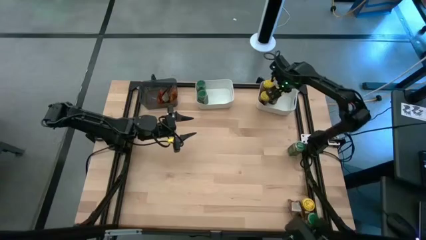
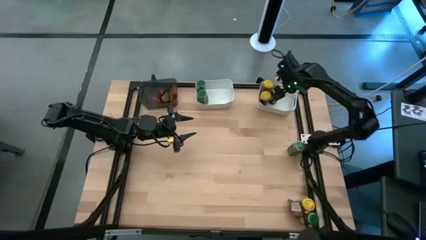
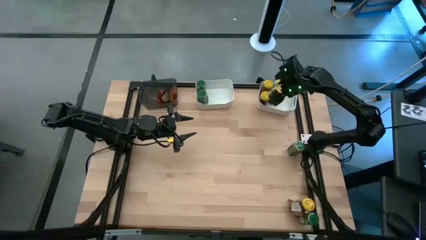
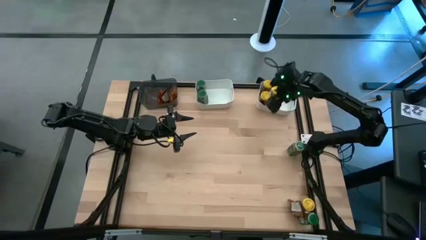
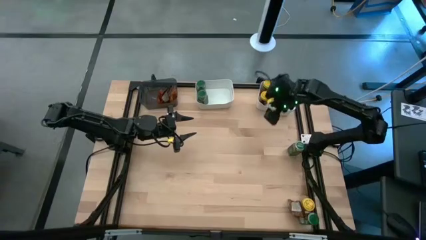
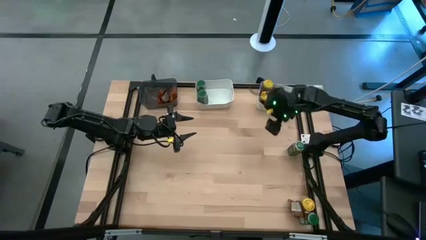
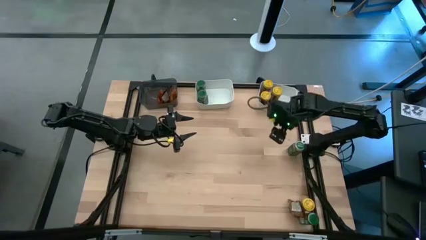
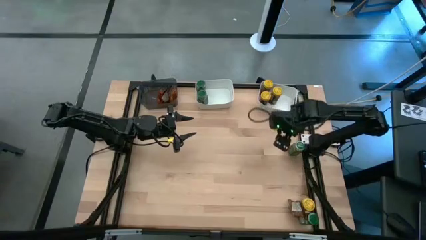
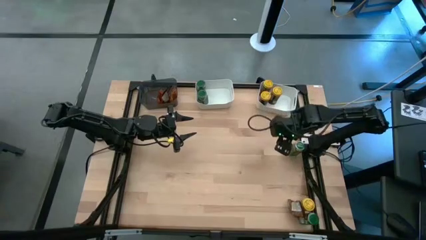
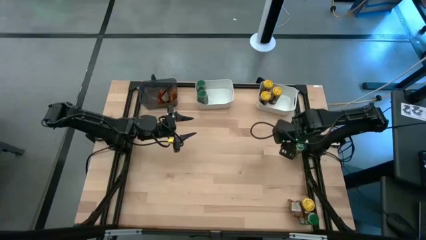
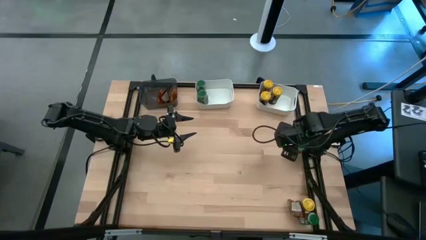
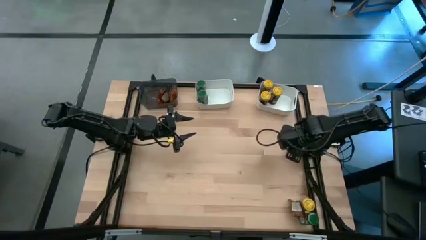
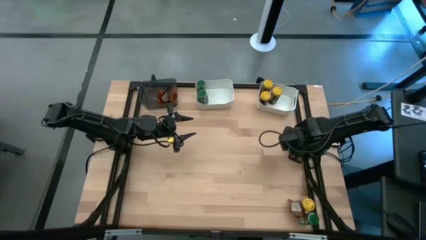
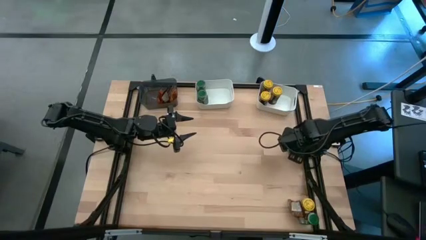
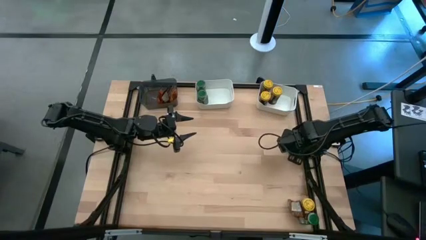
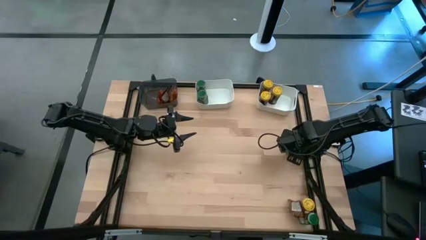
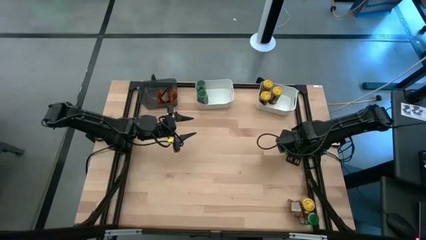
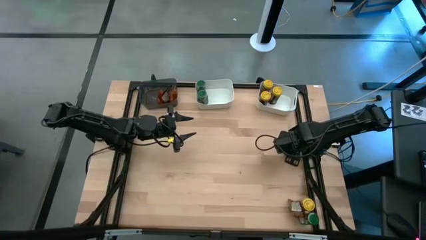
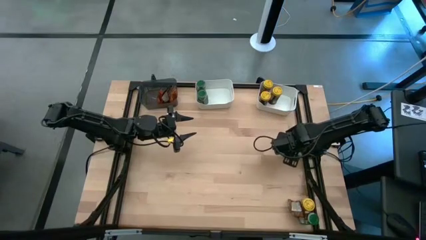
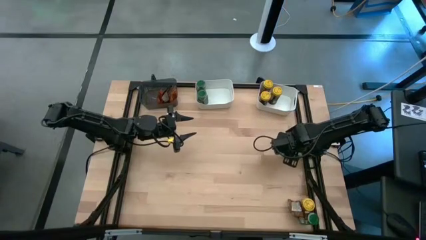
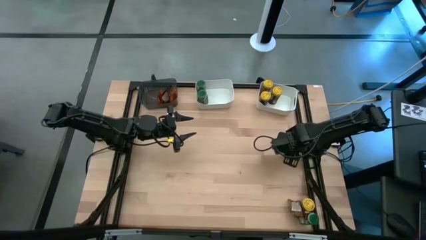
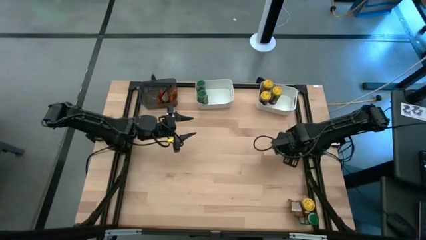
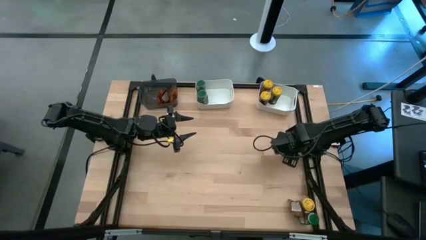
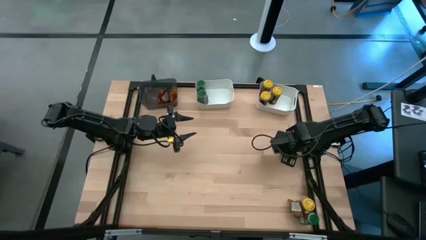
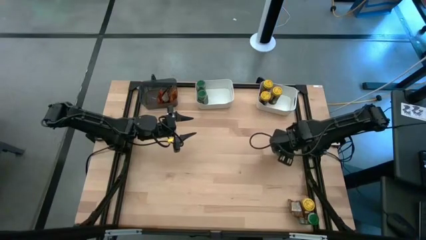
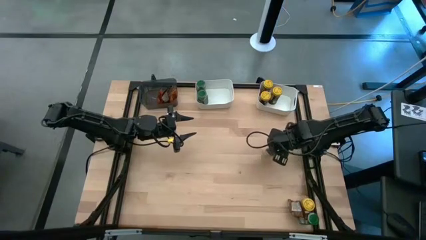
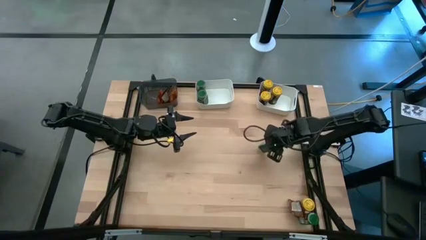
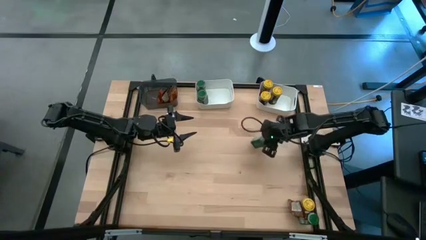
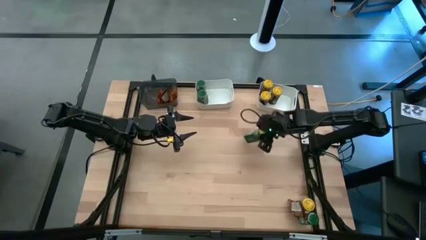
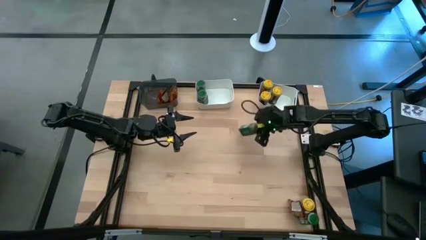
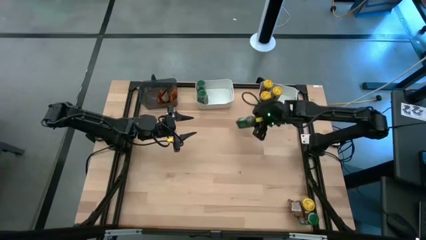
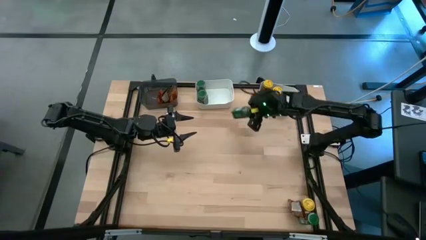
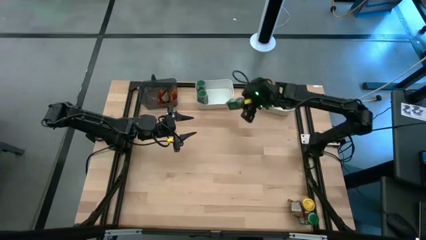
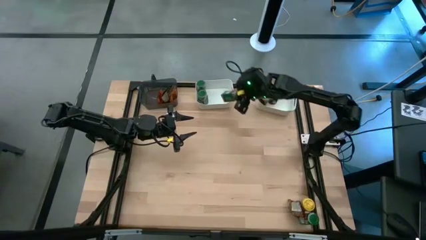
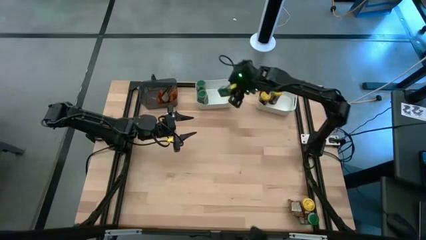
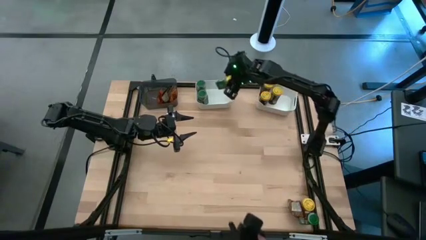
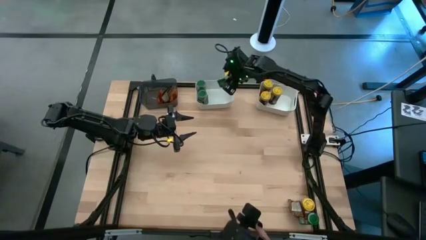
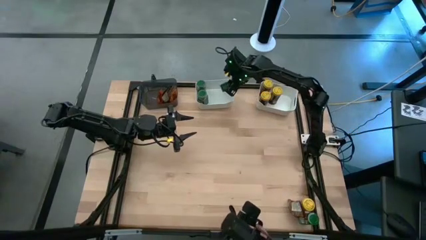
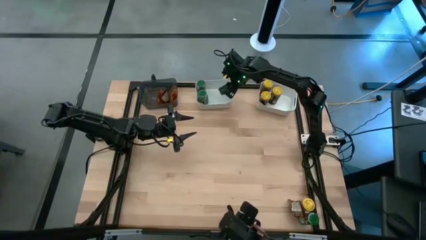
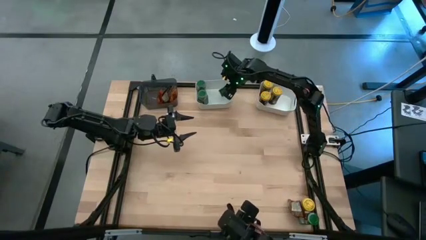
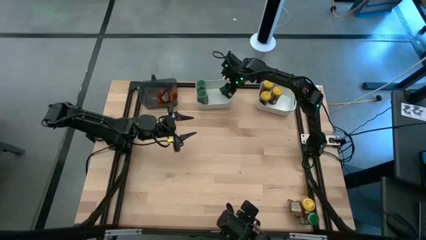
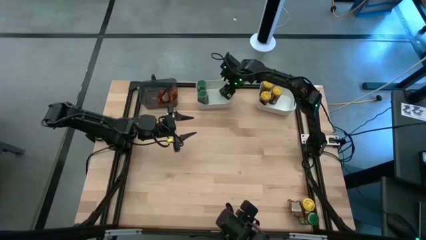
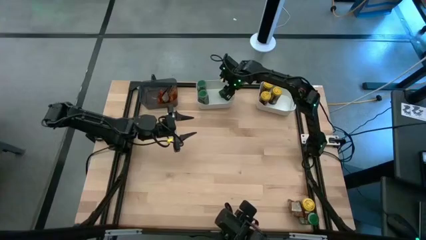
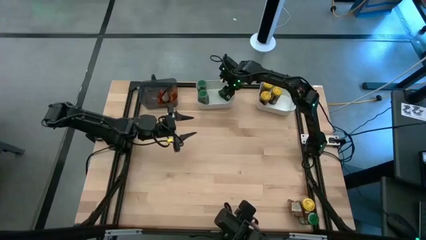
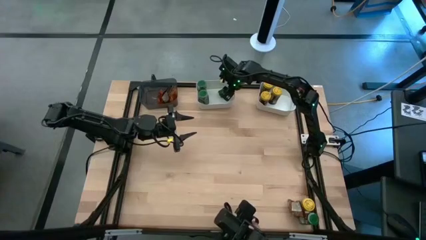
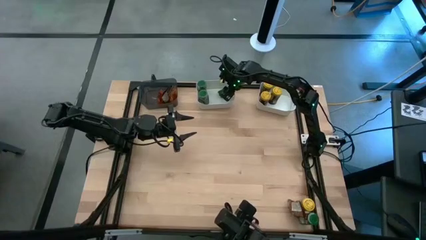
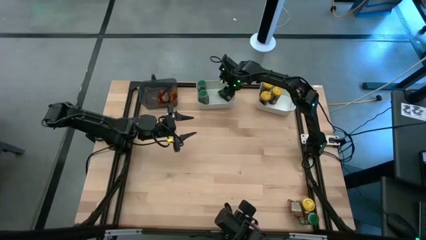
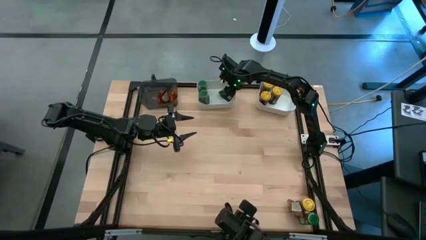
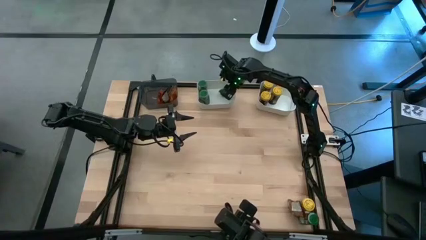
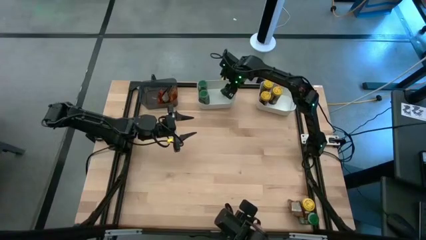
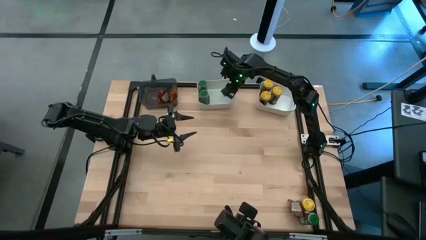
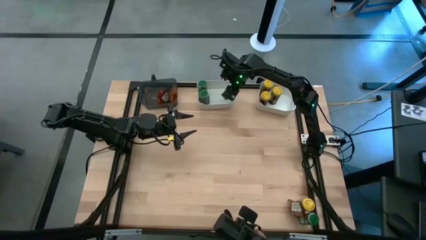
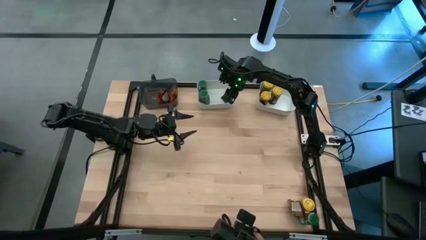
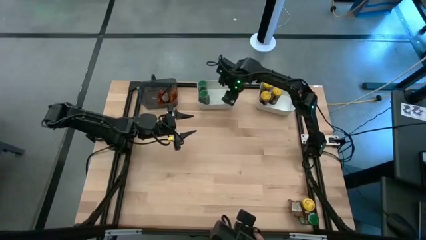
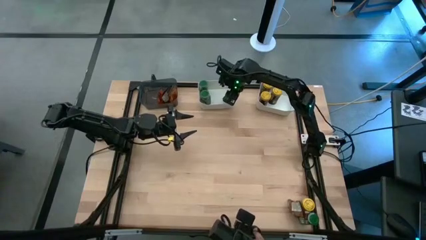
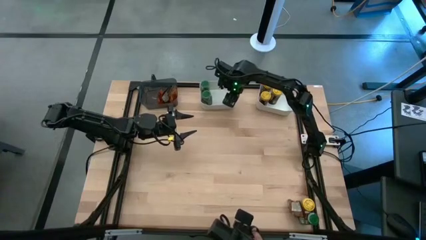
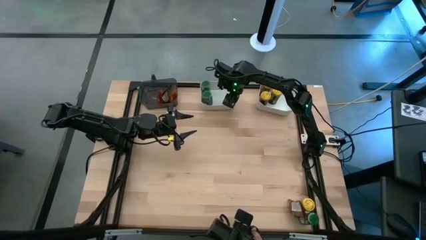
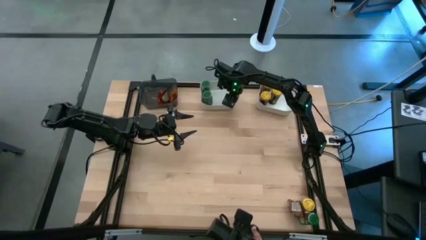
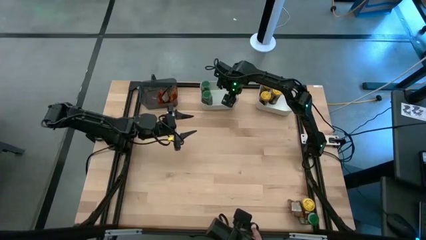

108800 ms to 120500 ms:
Task: Sort spices by type
Put the top green seasoning bottle into the left white bin

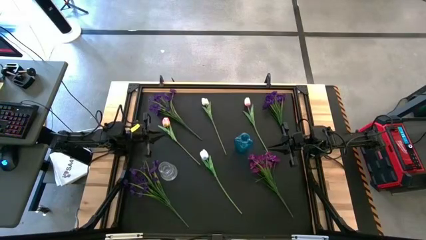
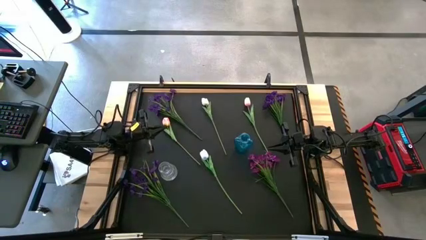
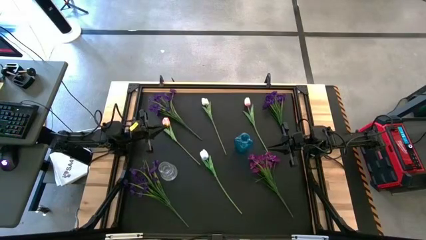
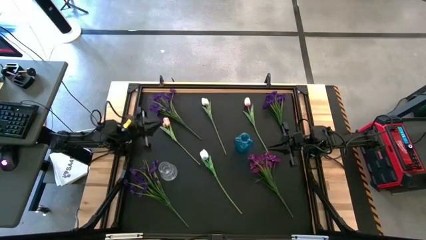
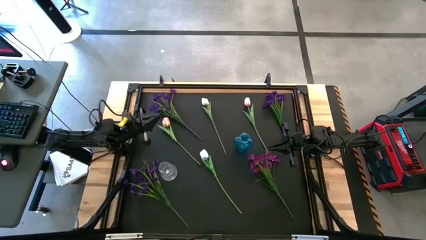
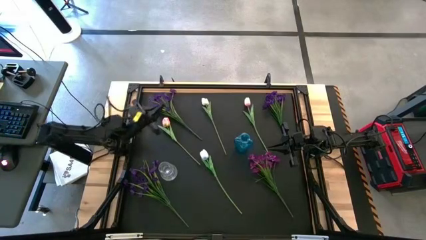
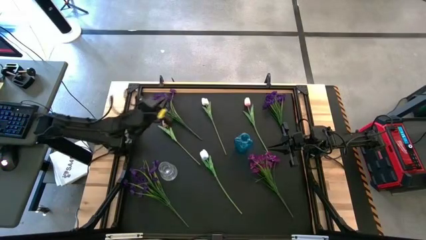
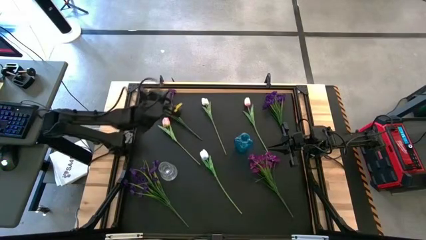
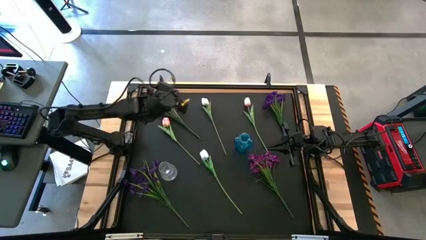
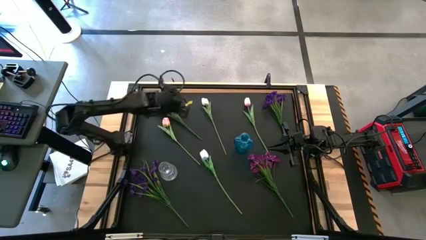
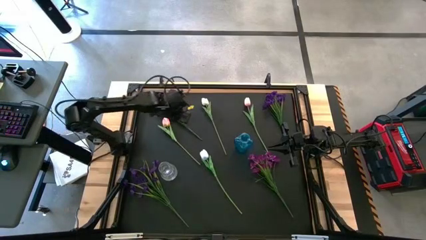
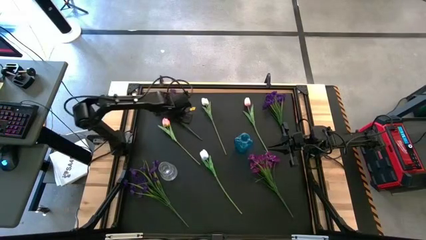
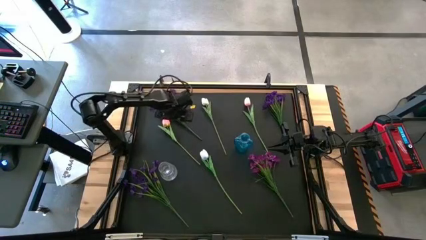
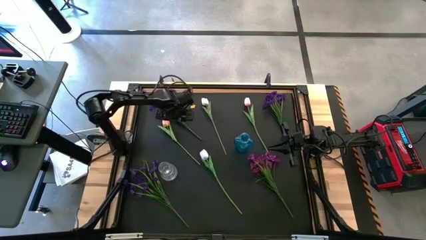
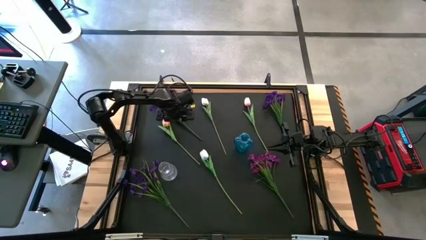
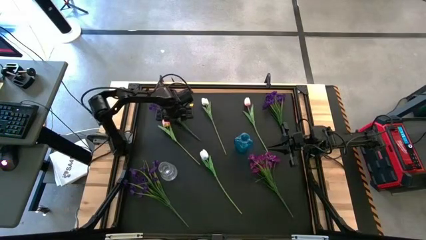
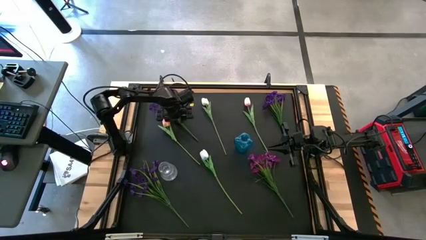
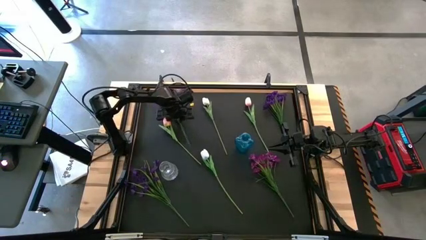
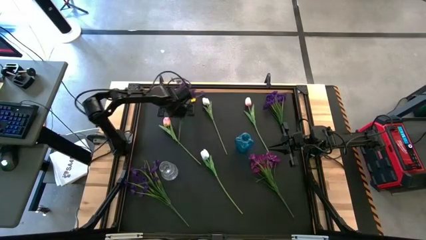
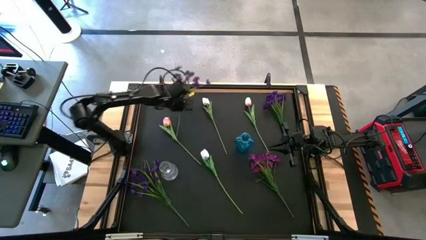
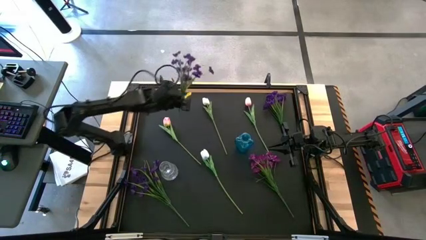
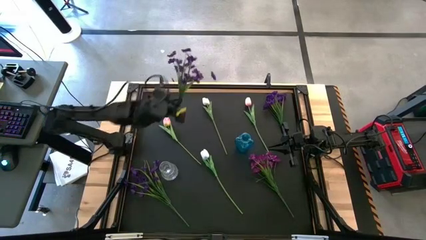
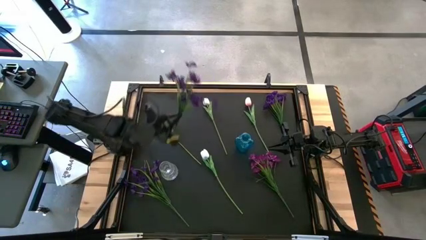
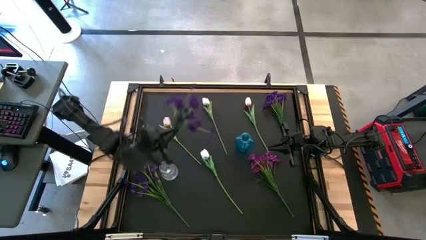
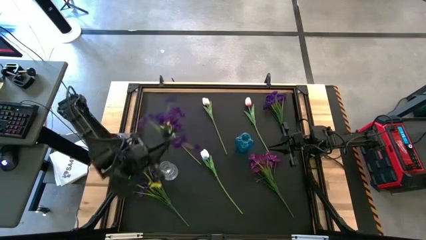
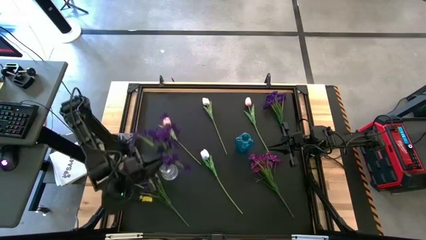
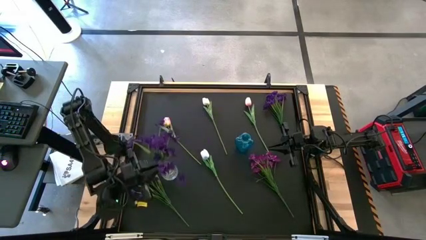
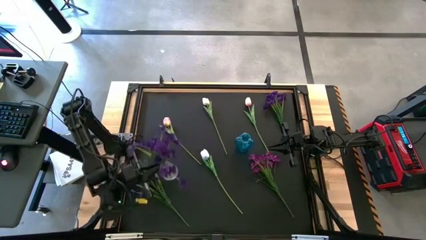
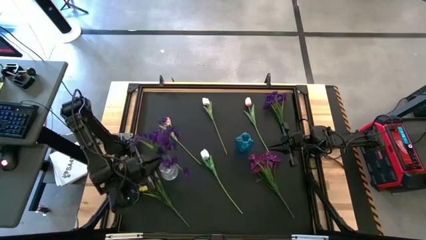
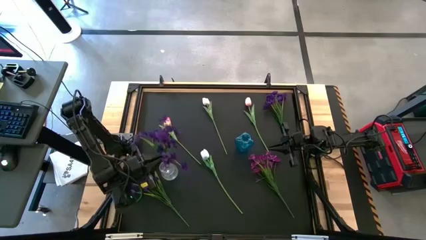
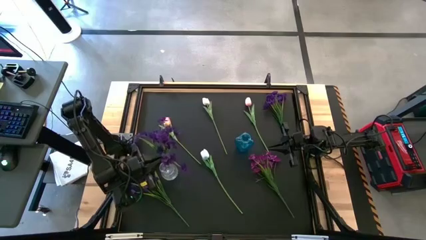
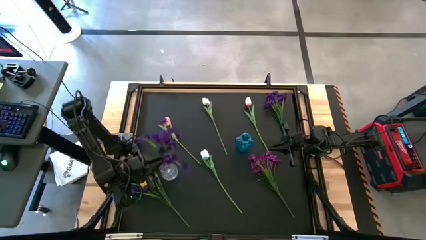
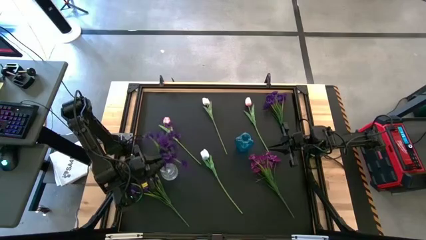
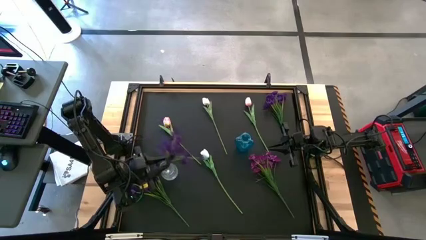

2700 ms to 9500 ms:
Task: Sort flowers into vase by color
Put the top left purple flowers into the transparent bin
